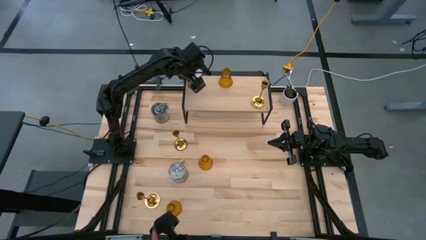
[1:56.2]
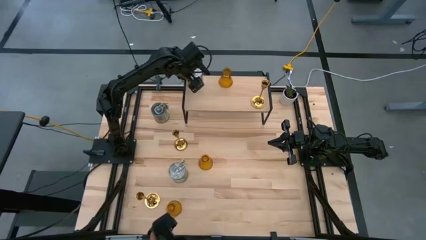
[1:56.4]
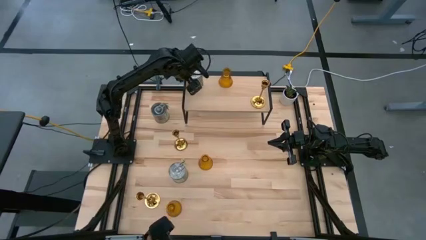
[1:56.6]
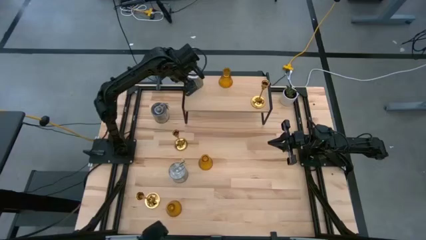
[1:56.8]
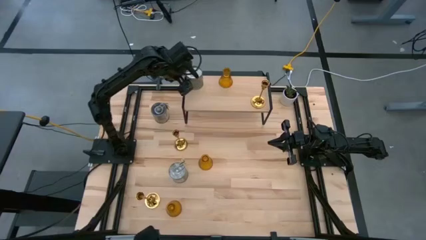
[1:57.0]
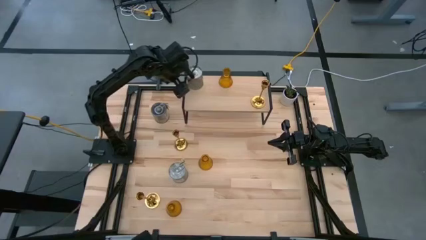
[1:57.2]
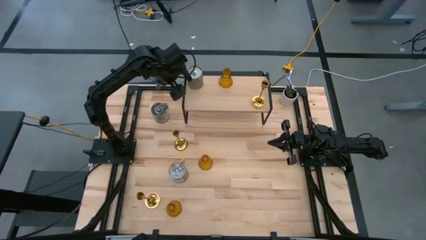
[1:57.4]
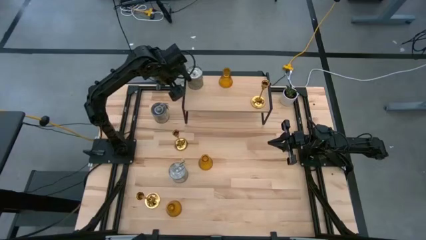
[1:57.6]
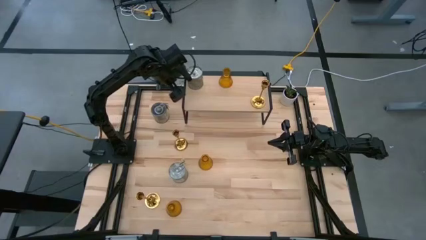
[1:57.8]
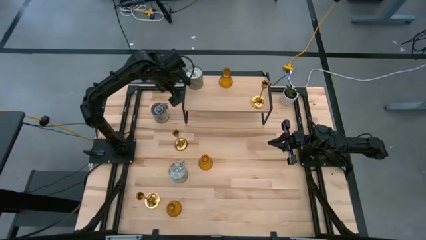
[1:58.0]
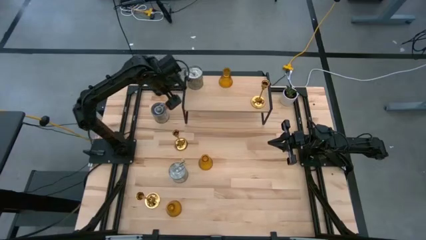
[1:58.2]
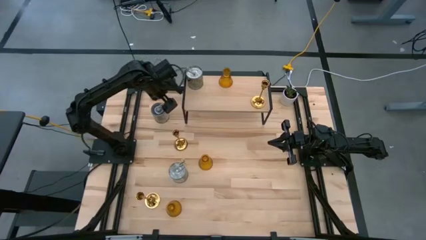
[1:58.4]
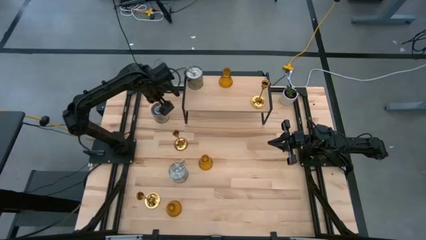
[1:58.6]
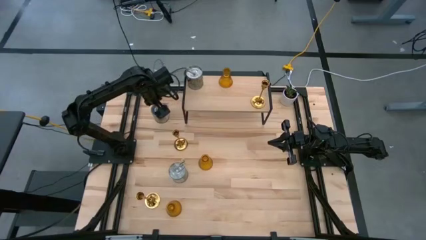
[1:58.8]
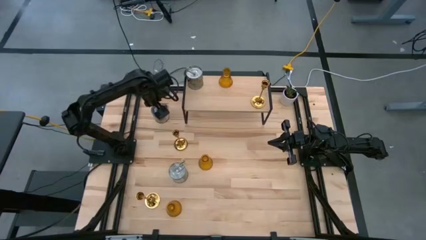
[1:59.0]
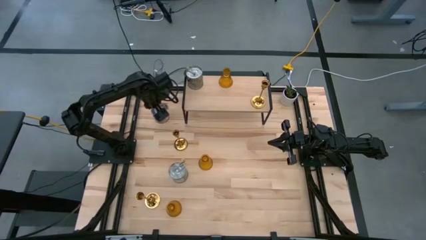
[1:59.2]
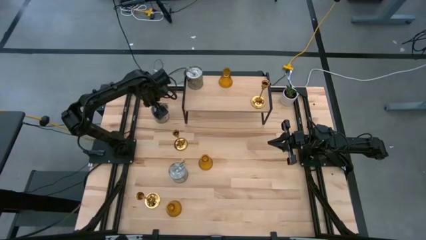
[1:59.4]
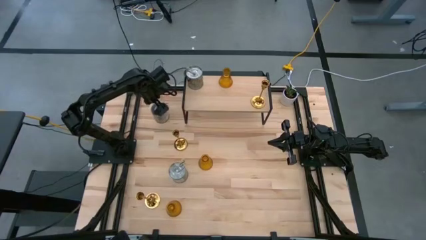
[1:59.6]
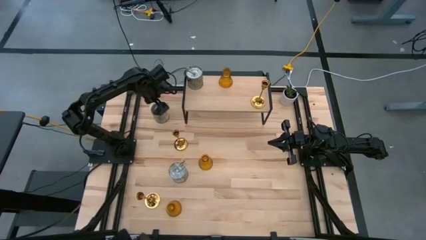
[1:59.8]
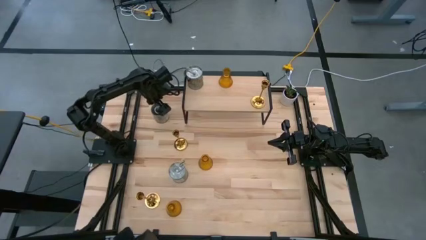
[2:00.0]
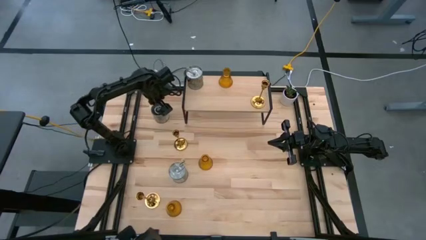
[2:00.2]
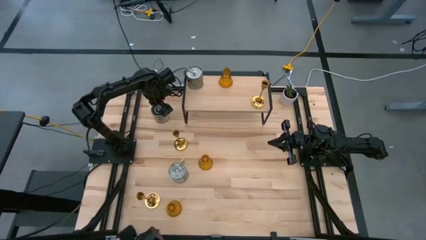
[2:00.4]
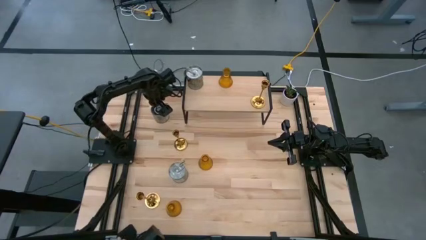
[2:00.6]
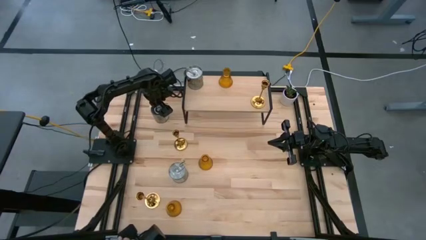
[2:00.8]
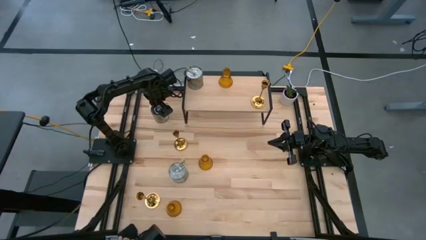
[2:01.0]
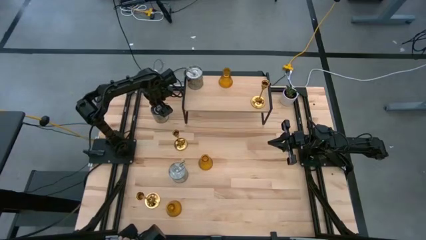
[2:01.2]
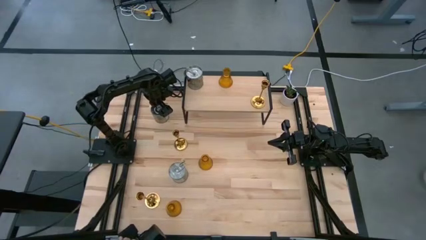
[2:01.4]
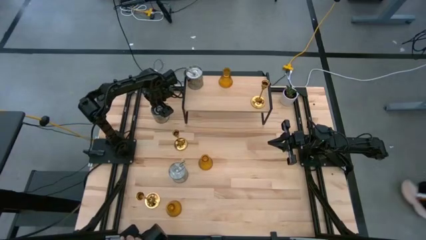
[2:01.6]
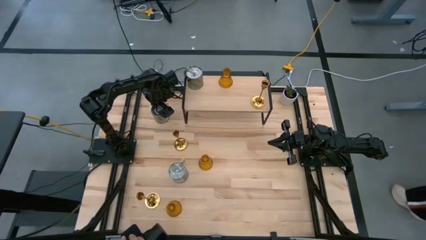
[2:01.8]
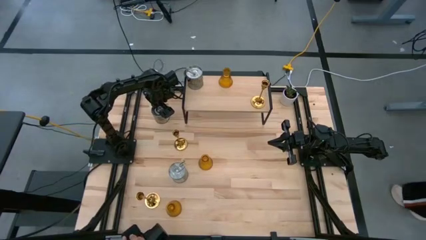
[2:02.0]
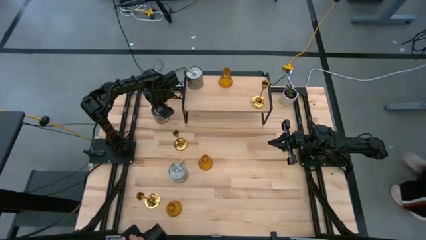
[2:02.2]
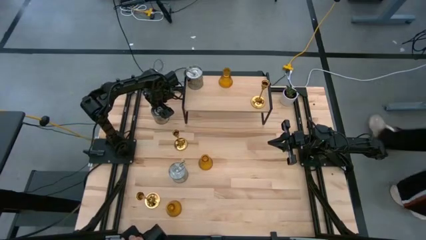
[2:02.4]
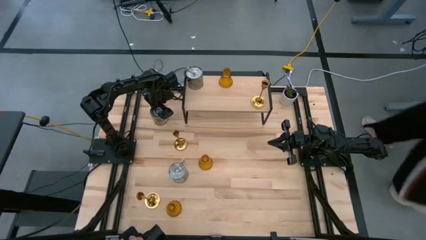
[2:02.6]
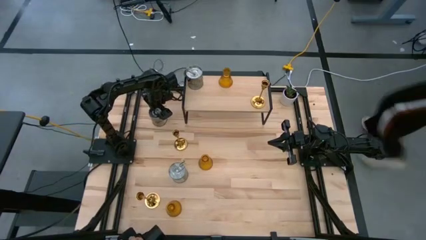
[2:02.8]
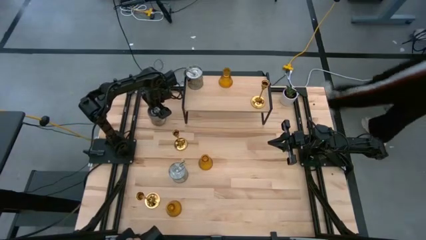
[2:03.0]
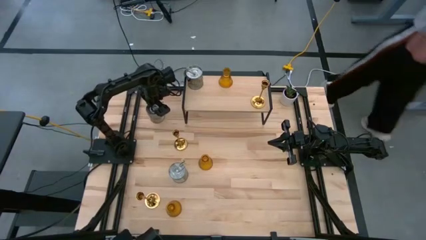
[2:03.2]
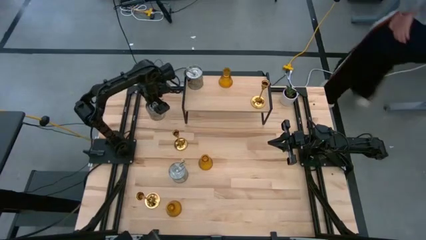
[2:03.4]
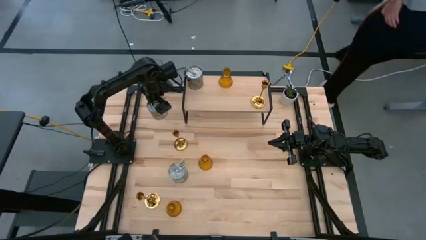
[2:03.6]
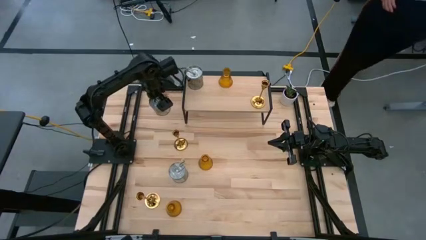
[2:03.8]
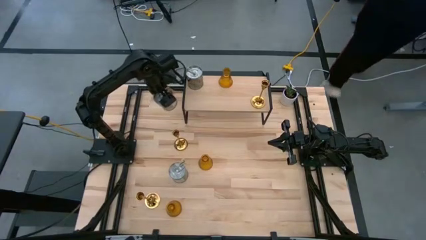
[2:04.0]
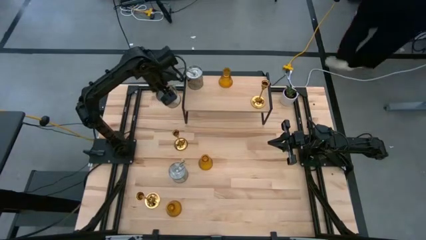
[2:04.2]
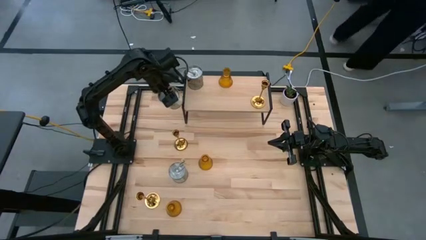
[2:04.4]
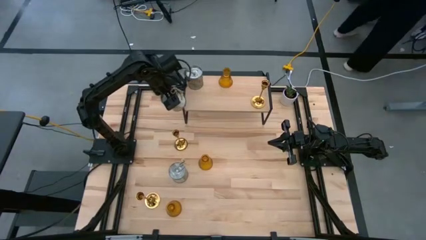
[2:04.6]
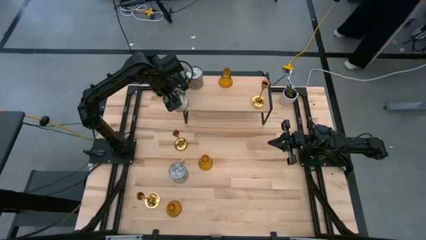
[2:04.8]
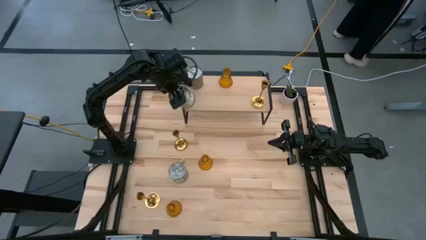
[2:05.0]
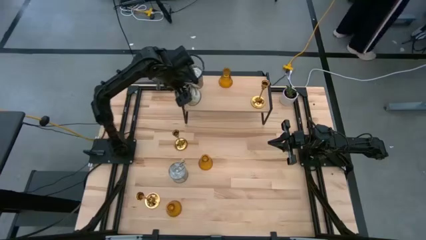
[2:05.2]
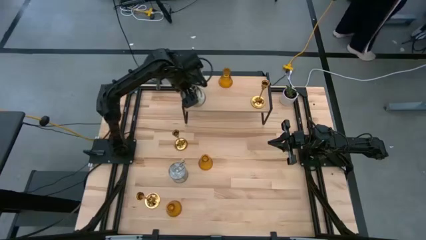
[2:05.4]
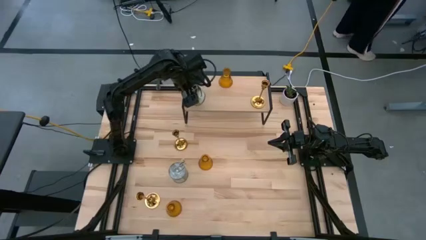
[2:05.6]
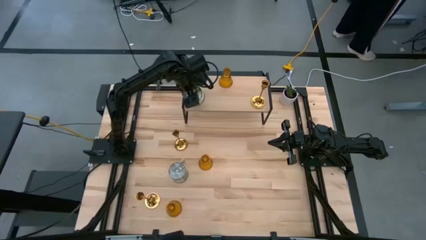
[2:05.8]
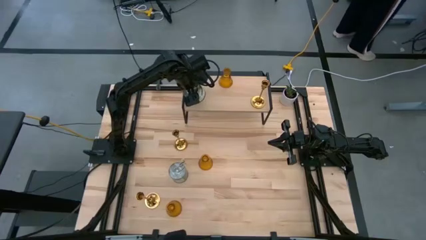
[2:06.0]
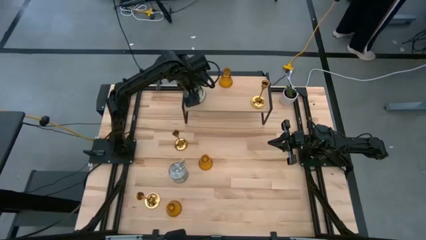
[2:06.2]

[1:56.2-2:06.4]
Task: Pick & Place candle stick holders
Put the top scented candle on the shelf aligned with the other scented candle

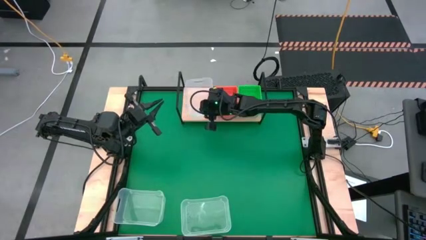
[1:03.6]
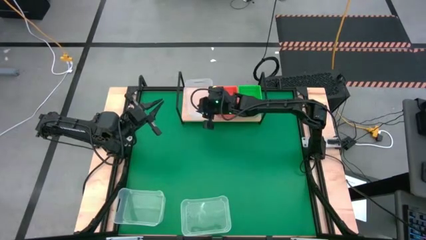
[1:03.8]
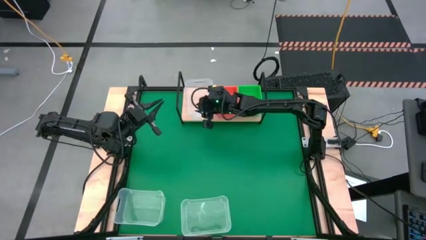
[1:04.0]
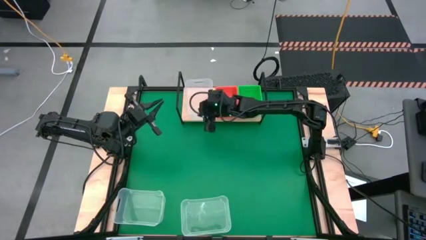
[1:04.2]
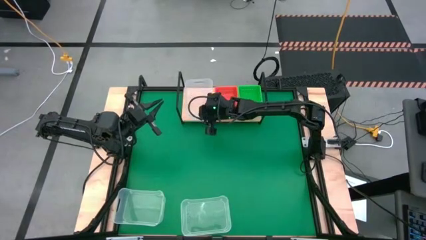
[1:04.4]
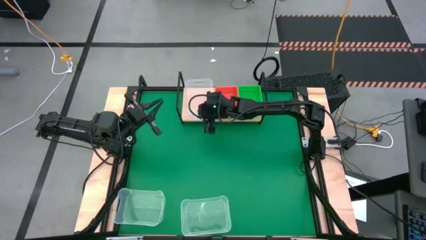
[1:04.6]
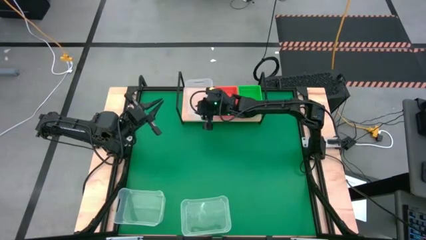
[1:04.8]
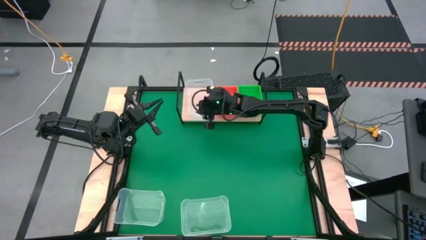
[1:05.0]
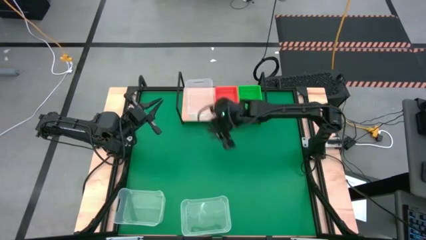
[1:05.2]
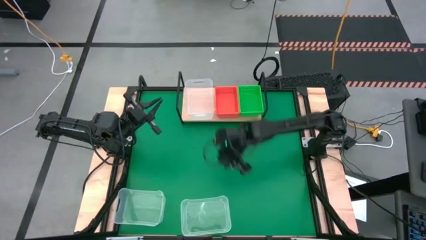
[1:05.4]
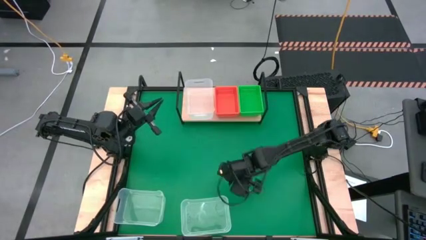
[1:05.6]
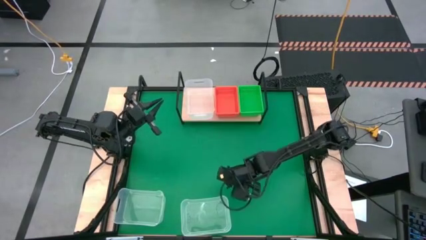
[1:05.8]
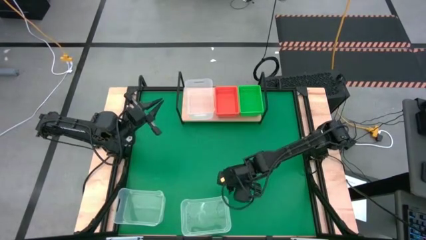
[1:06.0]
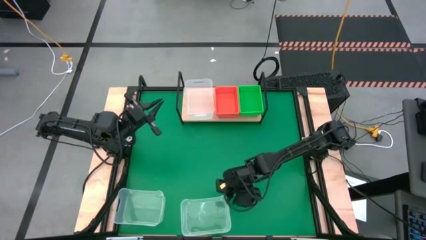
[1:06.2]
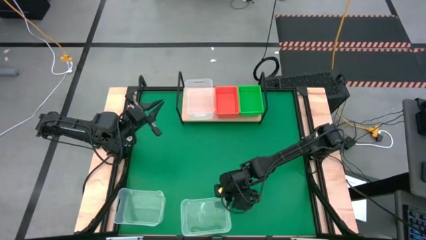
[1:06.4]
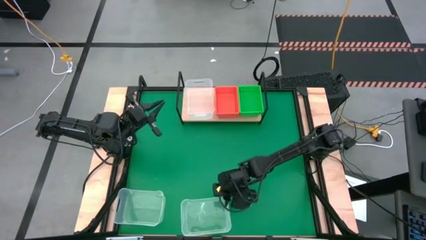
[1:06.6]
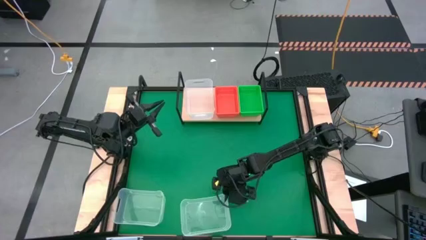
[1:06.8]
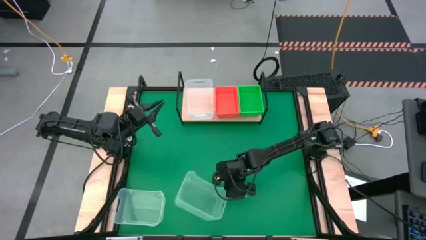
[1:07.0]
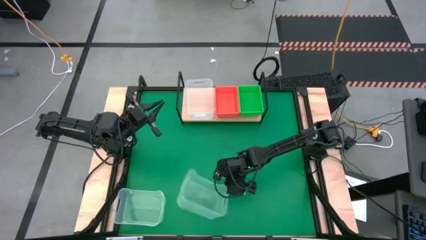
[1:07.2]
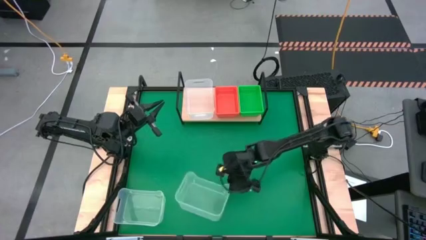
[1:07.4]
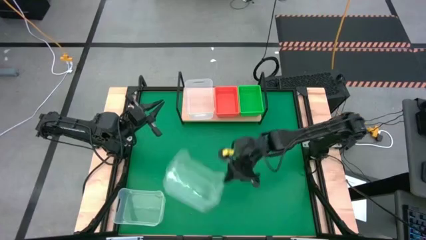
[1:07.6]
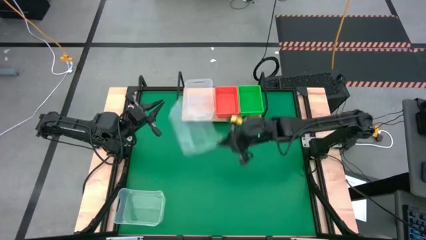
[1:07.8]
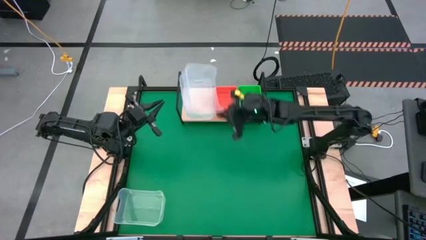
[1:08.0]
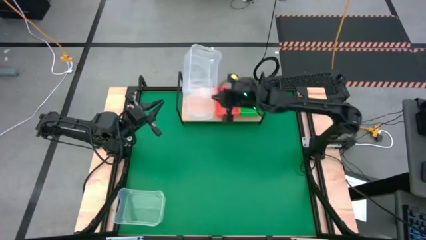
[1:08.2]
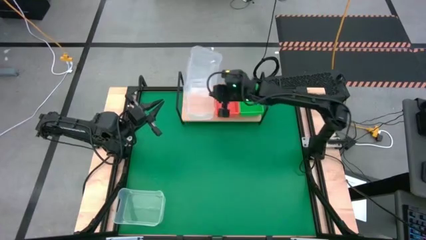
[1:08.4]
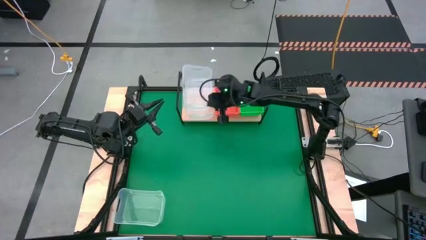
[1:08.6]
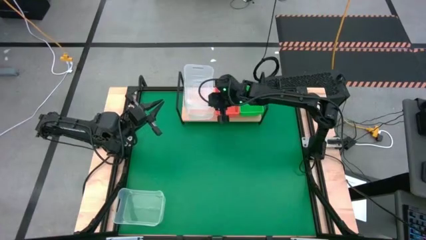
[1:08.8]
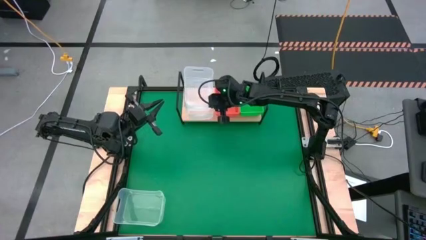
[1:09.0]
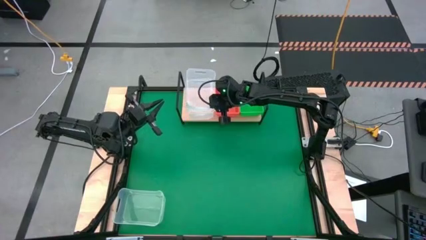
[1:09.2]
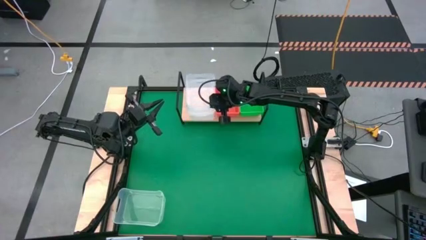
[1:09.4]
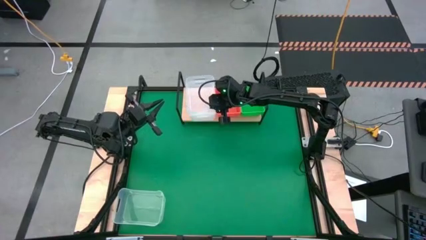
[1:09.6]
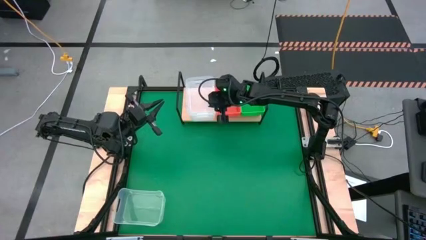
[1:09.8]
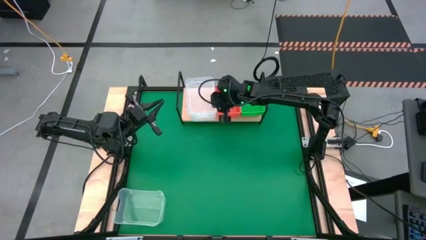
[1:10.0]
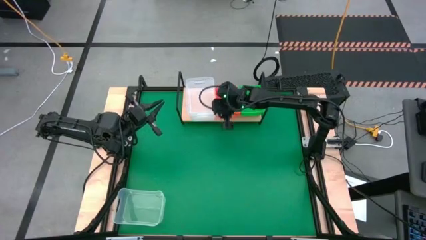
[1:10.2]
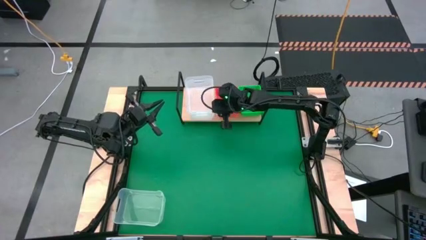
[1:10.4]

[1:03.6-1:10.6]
Task: Stack baskets on shelf by color
Stack the right transparent bin on the transparent bin on the shelf
